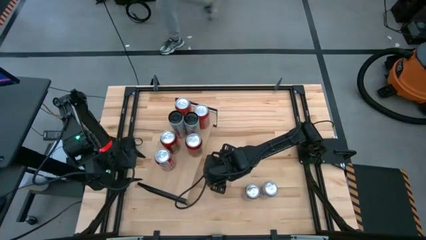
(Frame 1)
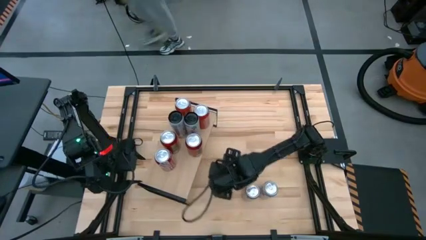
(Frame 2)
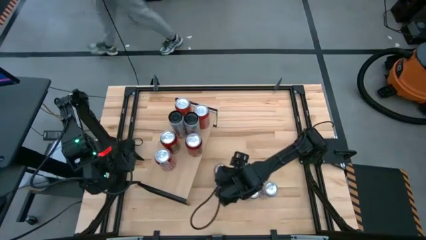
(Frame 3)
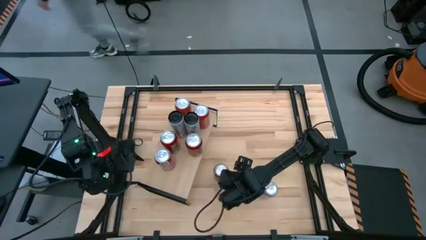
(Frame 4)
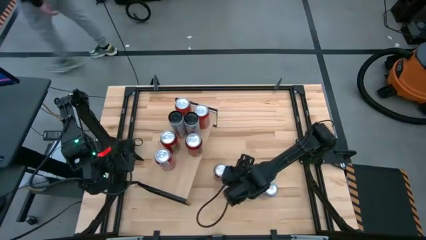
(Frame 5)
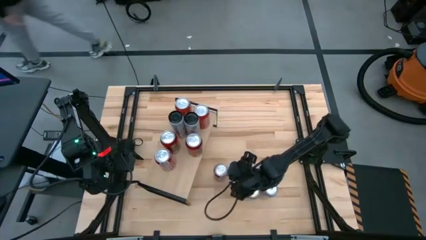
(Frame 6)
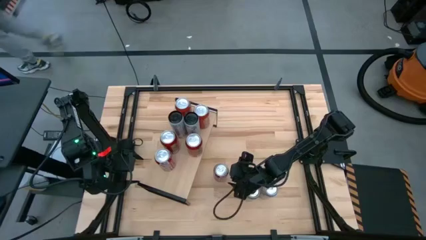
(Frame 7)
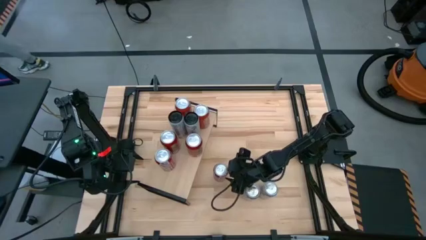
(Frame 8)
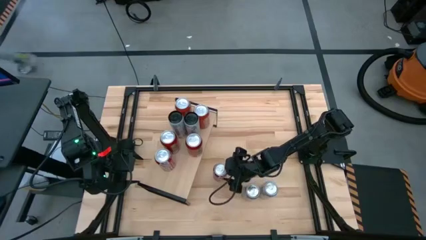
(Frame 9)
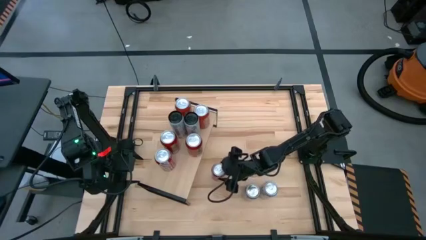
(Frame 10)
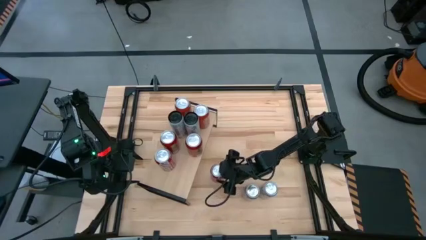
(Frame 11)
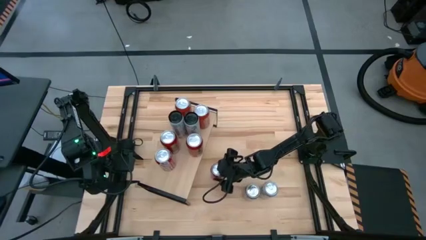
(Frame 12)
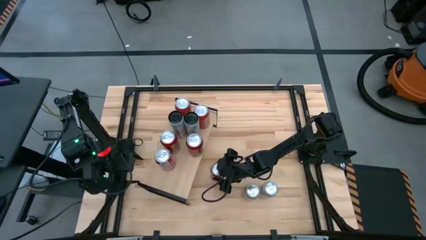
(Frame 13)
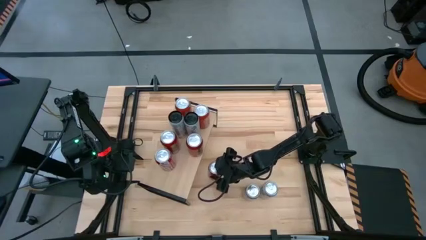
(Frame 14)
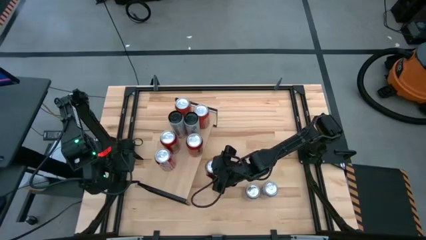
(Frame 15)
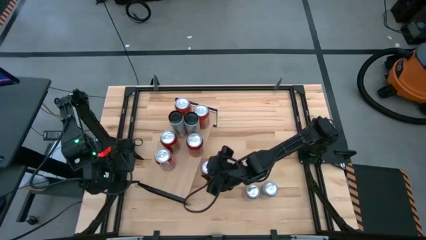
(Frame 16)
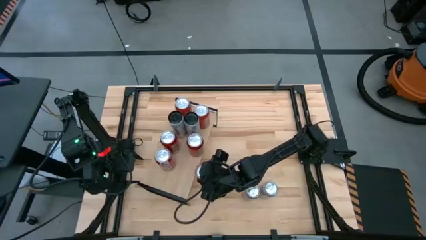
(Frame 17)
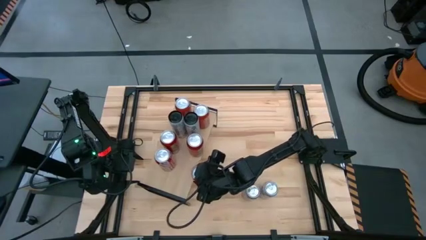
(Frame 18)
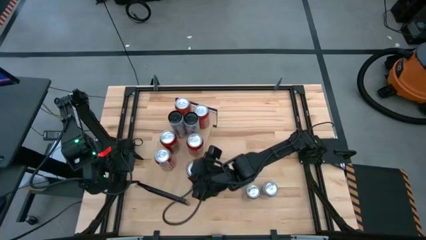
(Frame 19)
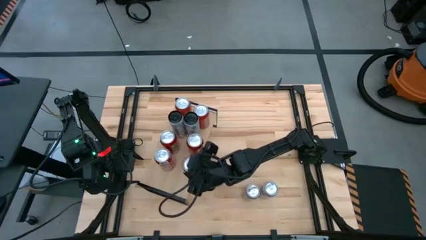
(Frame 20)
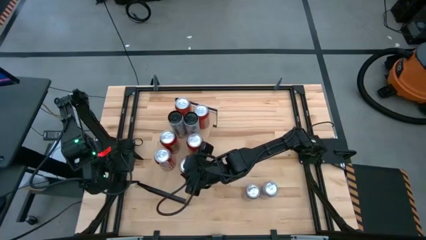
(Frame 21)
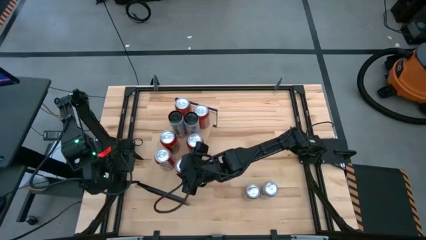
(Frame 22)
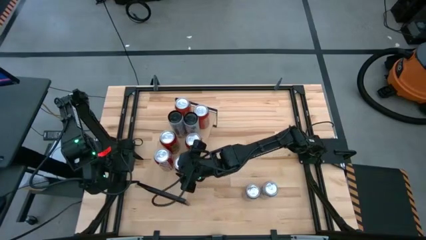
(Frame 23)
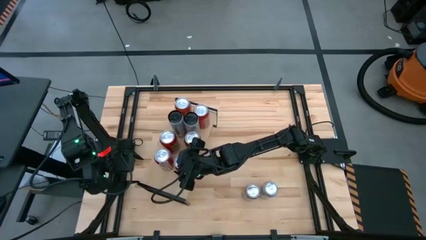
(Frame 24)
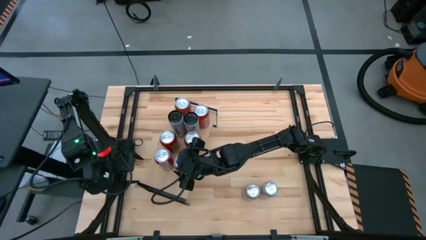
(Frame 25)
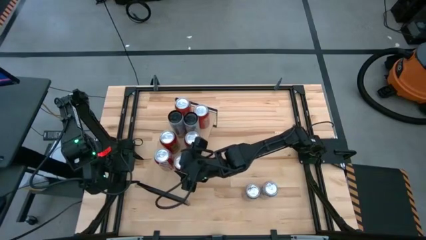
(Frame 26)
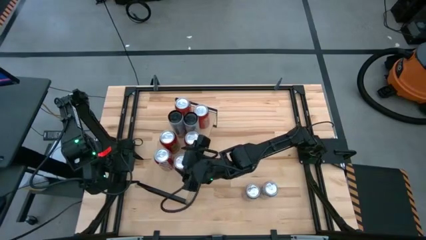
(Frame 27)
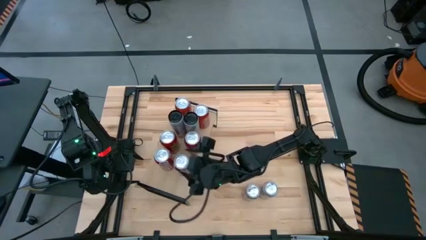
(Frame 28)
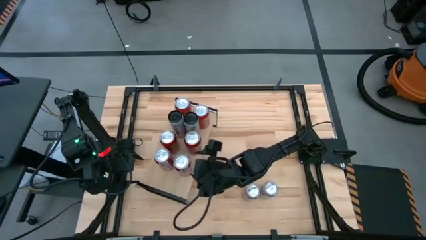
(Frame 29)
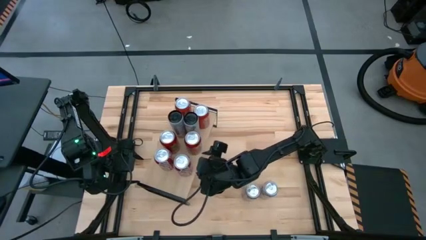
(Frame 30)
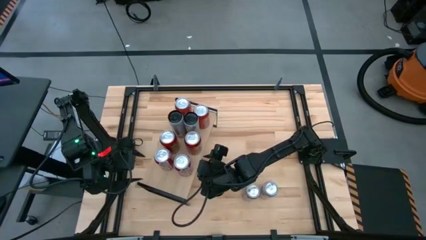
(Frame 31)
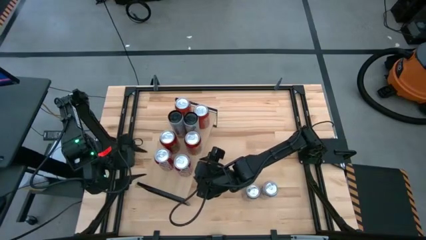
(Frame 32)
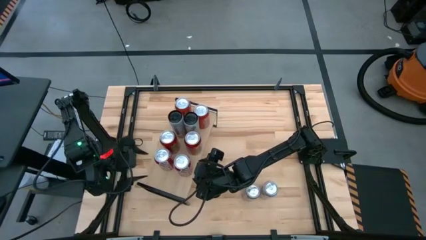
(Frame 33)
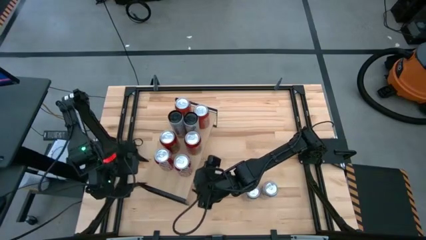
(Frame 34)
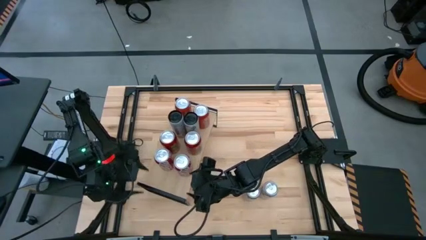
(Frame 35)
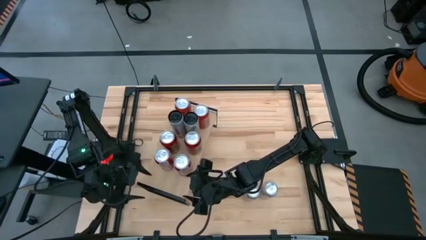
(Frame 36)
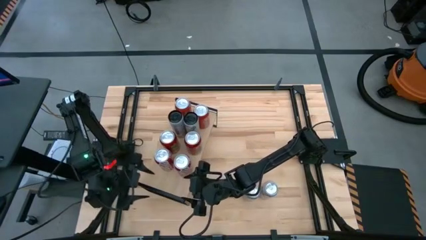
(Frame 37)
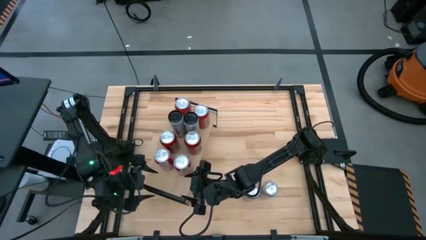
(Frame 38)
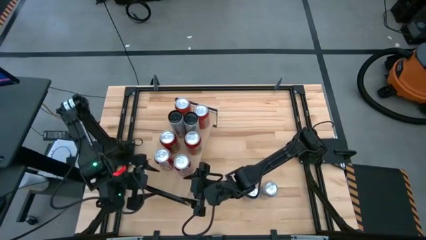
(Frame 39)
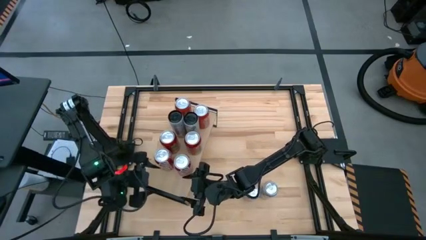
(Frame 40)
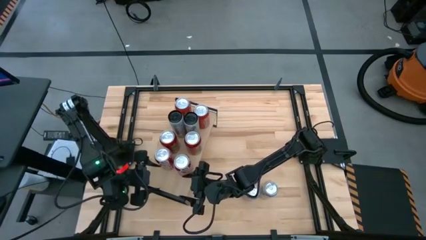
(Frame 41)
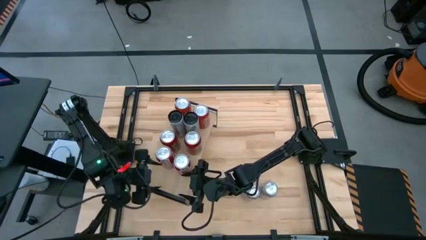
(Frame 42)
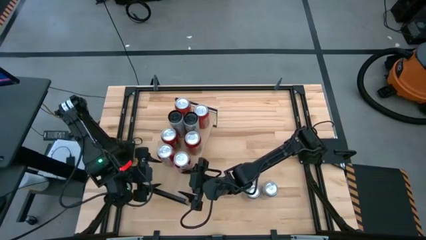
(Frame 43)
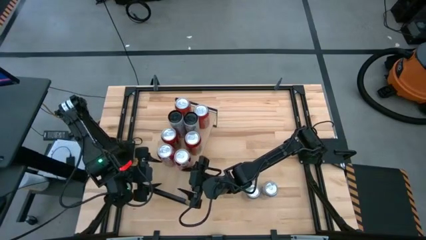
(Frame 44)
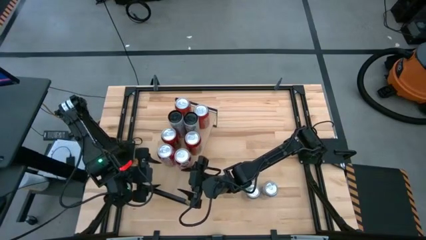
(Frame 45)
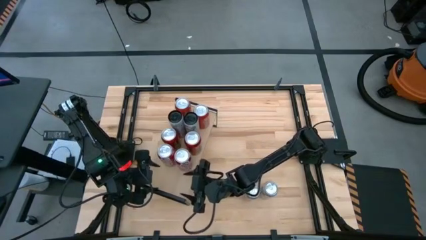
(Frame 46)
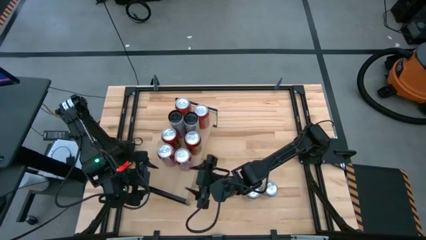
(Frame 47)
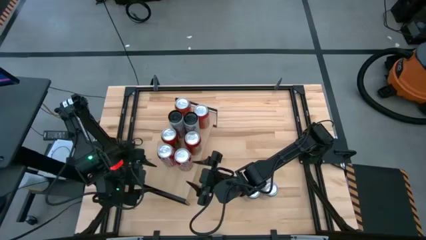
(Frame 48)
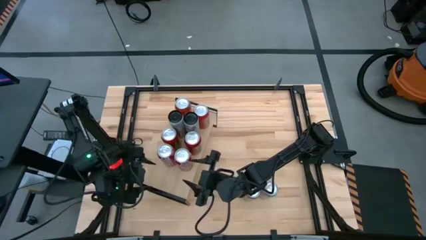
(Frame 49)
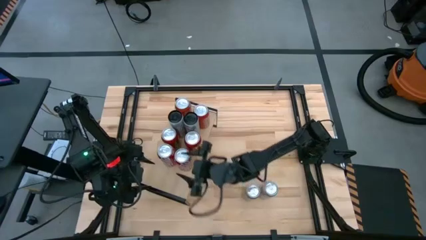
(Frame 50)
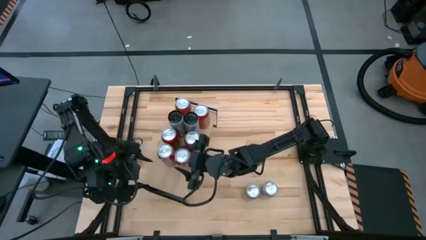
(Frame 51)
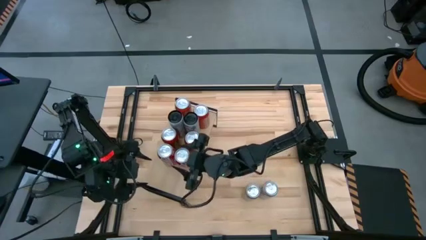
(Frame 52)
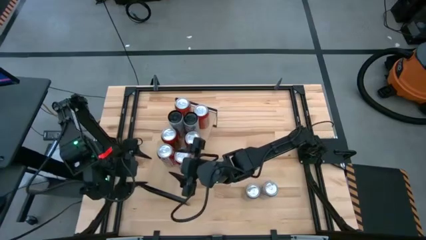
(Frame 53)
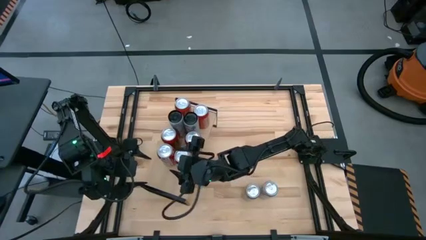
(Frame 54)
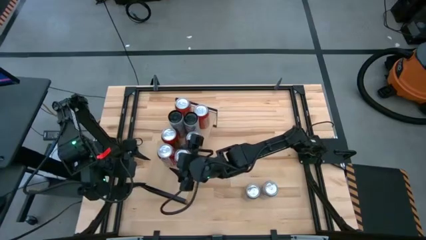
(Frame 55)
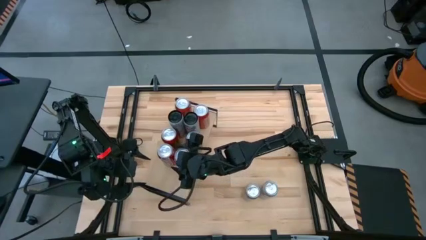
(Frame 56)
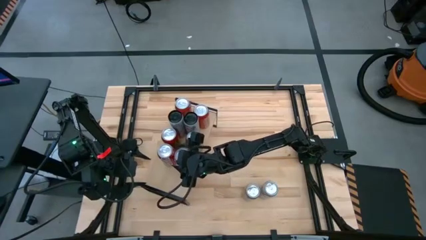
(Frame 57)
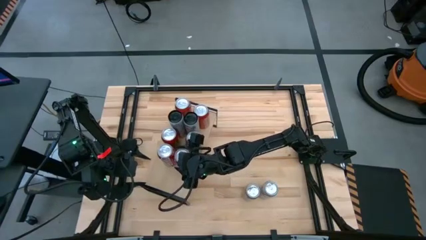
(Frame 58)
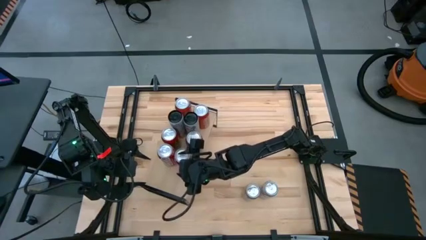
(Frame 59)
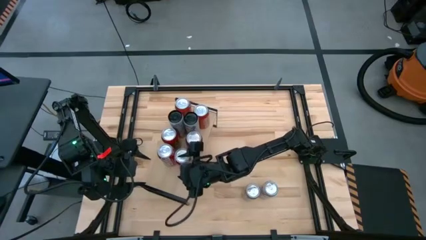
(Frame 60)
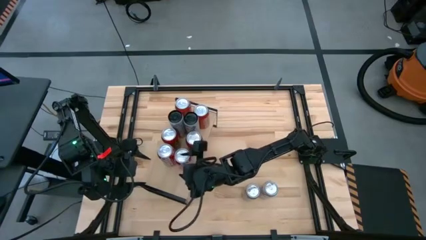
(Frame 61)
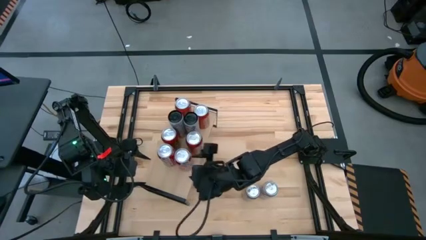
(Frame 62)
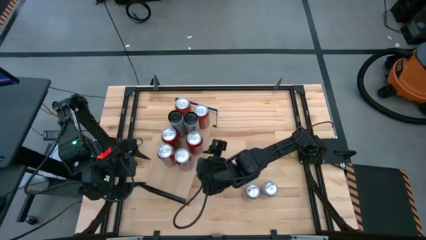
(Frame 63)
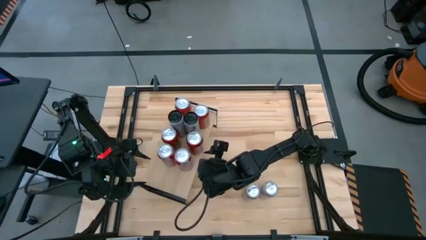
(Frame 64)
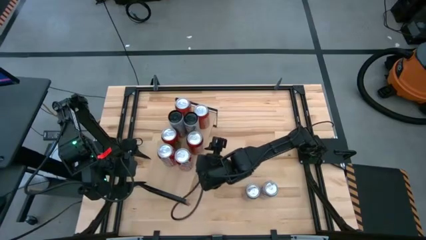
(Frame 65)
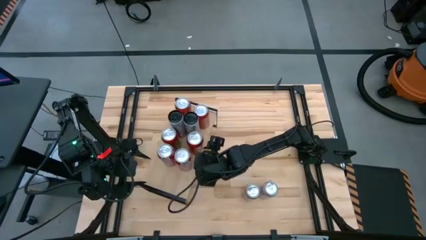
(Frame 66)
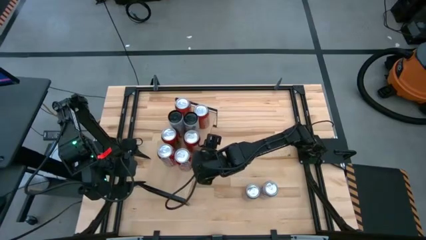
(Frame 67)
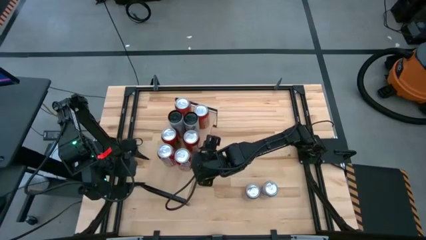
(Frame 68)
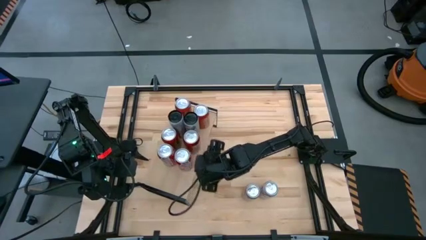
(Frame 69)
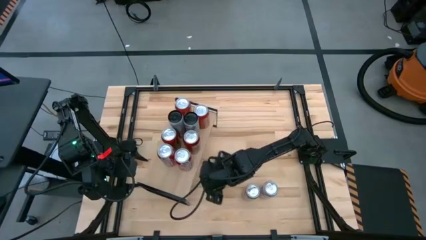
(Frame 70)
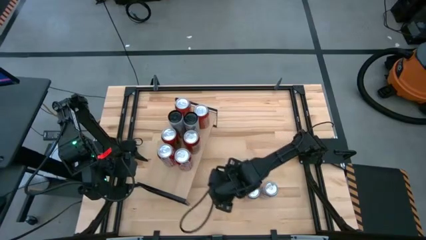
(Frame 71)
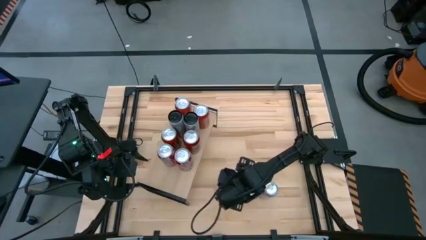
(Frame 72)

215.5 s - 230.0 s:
Task: Place canned beverage on shelf
Put the red soda can on the shelf

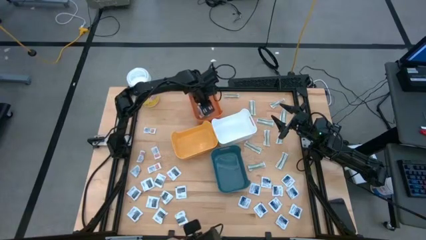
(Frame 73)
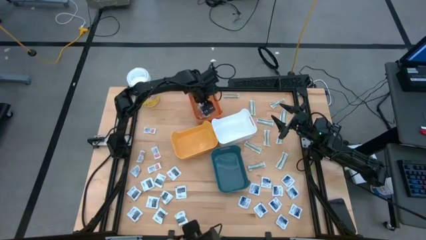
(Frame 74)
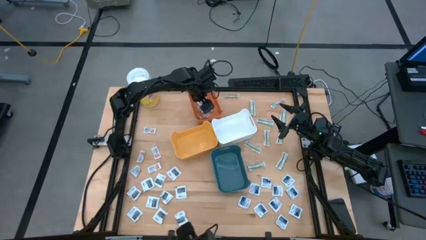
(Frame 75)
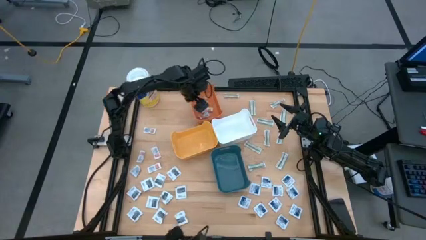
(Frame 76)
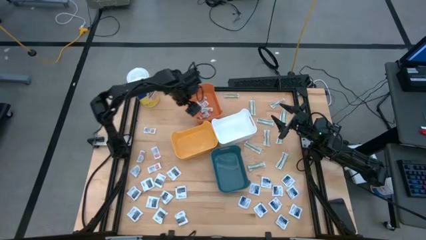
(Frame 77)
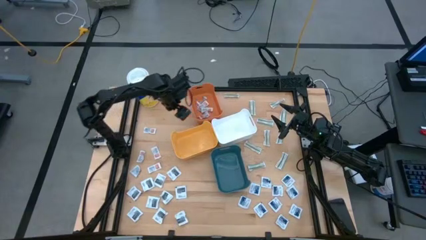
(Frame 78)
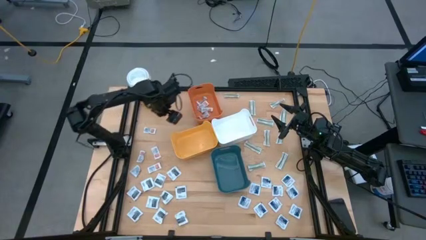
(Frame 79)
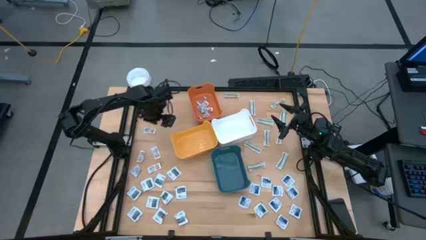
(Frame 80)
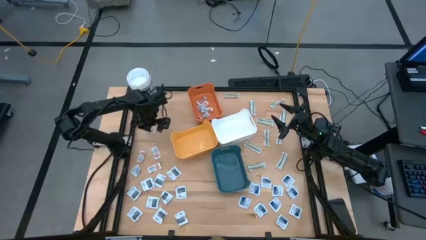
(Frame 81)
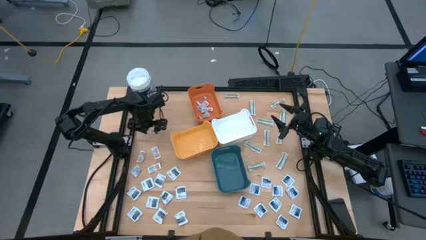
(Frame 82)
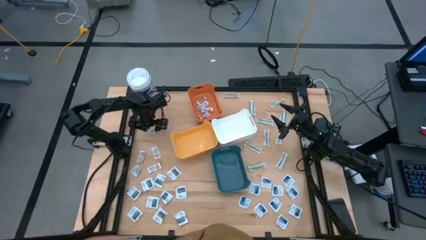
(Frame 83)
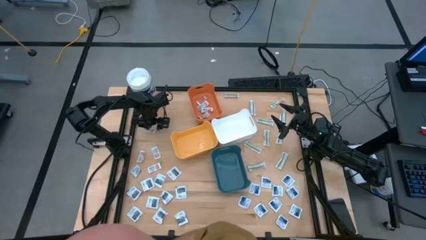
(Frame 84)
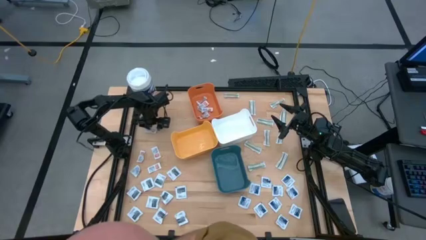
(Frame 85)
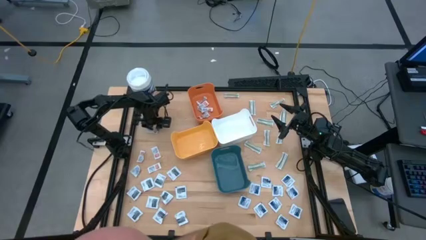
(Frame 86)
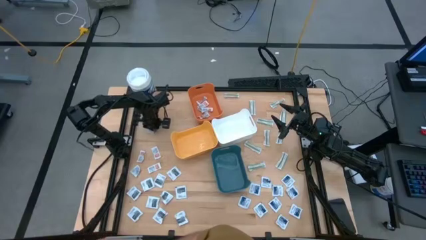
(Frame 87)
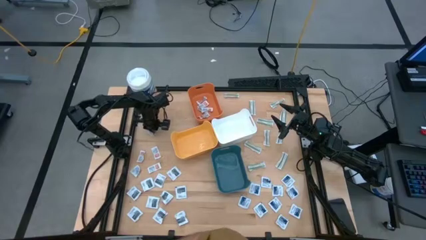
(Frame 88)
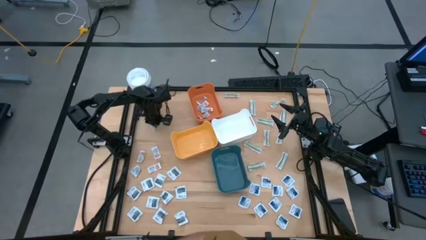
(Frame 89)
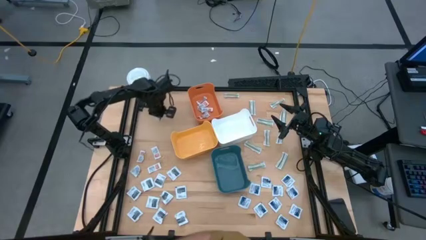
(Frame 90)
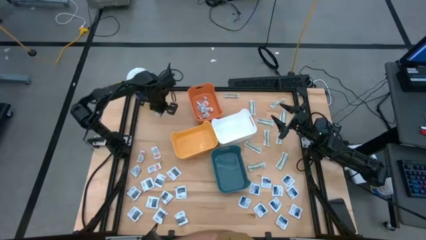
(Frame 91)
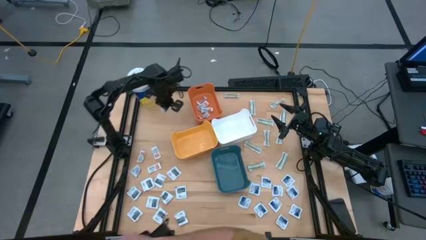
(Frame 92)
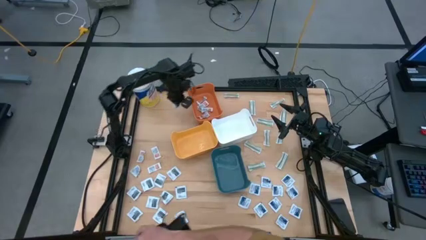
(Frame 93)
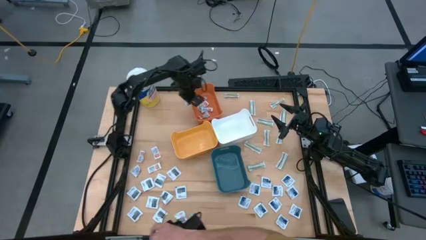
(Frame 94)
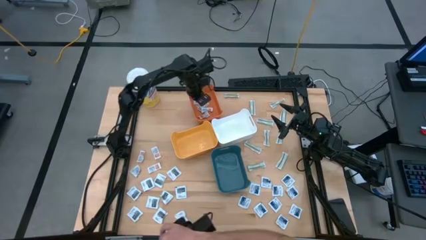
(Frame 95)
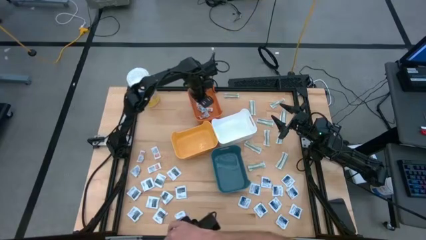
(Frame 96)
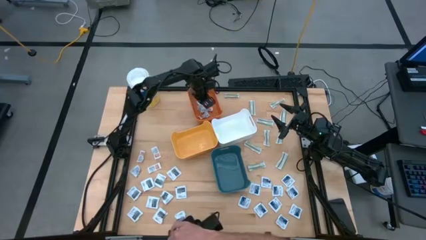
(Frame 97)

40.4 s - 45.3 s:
Task: Pick & Place First Aid Supplies
Put the orange ointment pack into the orange bin
